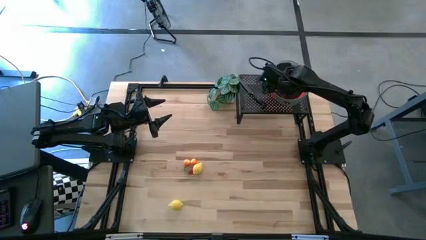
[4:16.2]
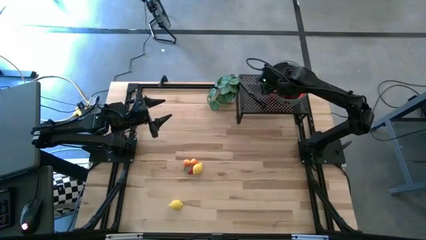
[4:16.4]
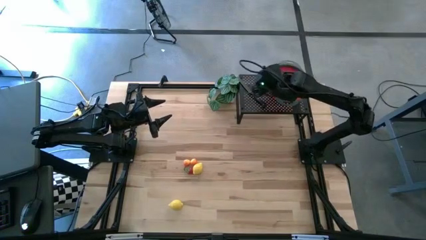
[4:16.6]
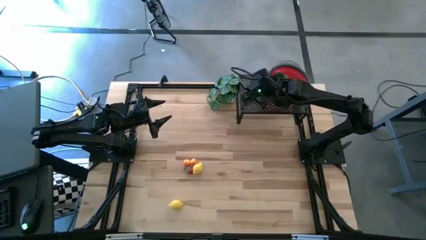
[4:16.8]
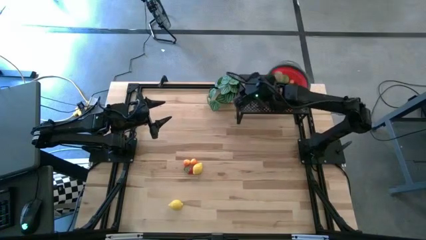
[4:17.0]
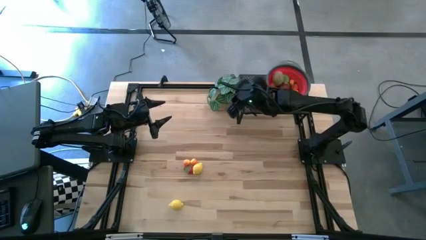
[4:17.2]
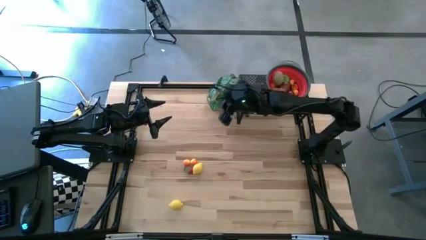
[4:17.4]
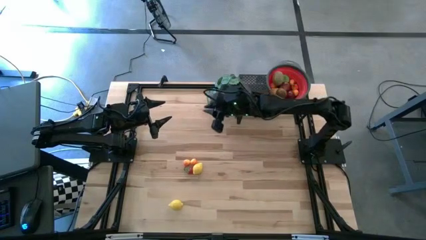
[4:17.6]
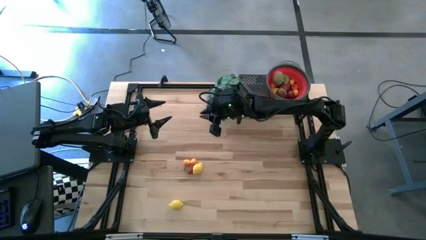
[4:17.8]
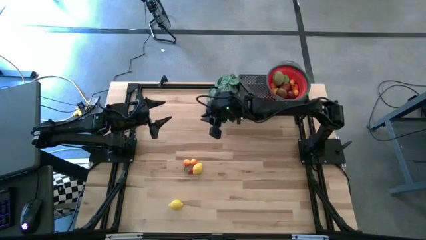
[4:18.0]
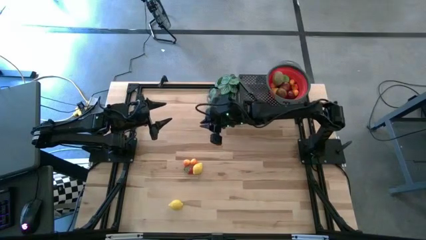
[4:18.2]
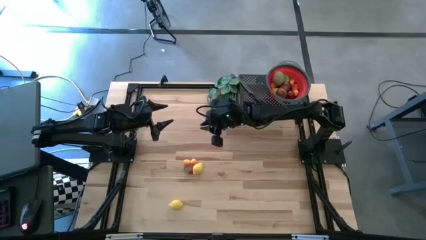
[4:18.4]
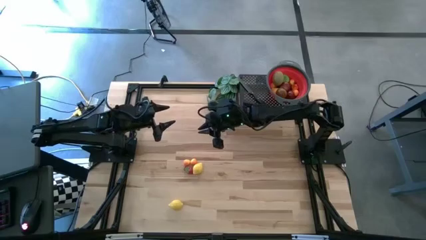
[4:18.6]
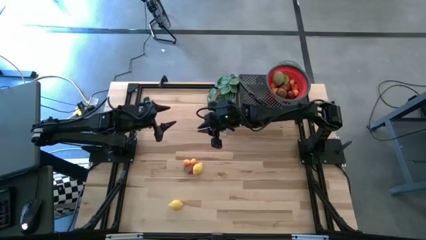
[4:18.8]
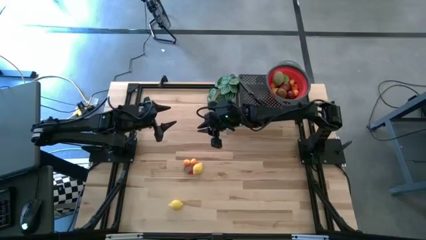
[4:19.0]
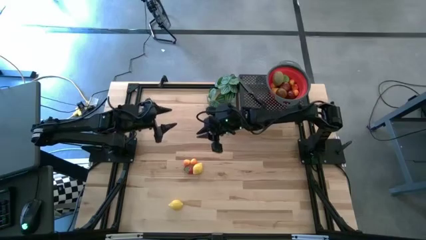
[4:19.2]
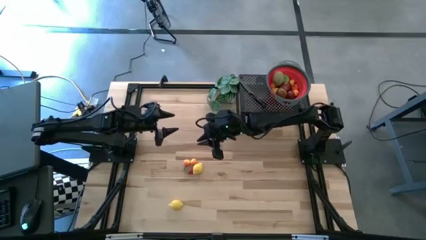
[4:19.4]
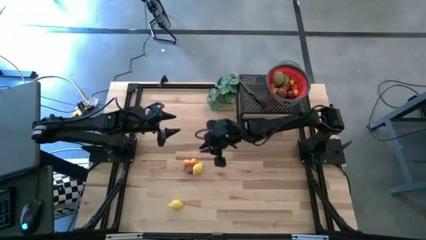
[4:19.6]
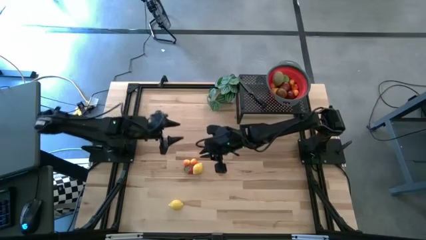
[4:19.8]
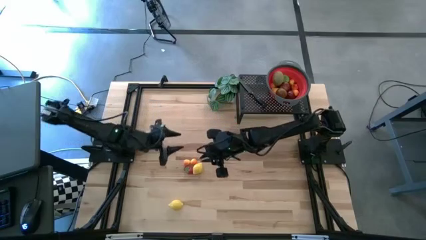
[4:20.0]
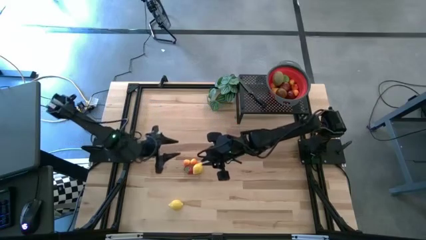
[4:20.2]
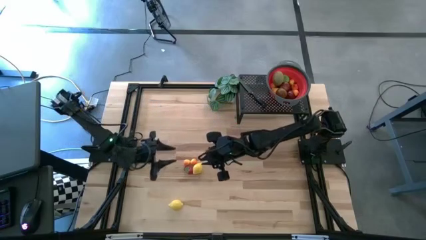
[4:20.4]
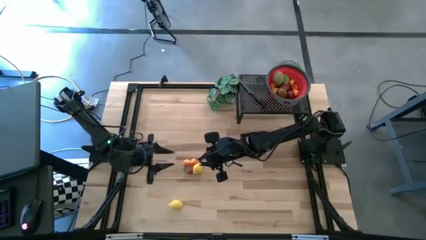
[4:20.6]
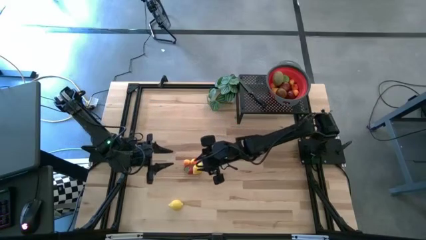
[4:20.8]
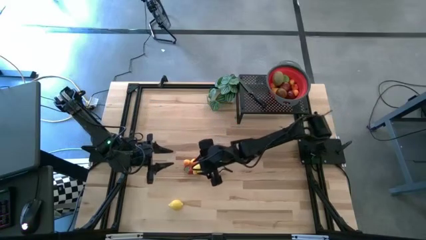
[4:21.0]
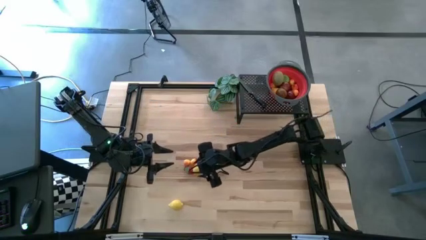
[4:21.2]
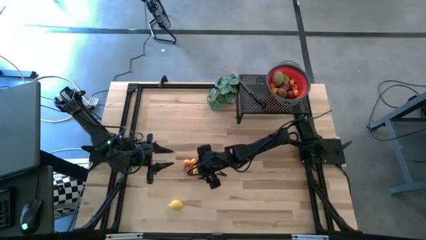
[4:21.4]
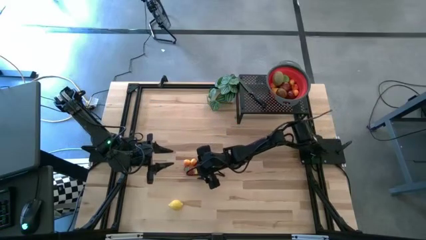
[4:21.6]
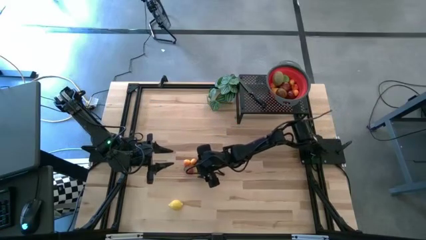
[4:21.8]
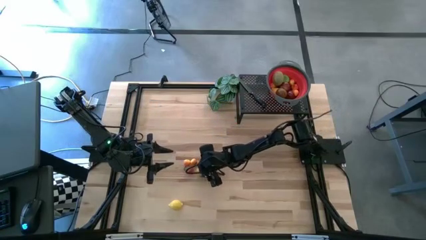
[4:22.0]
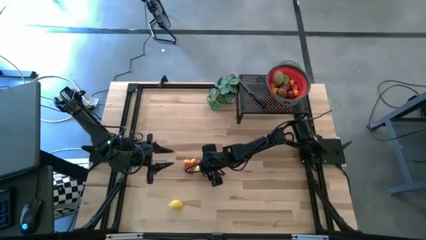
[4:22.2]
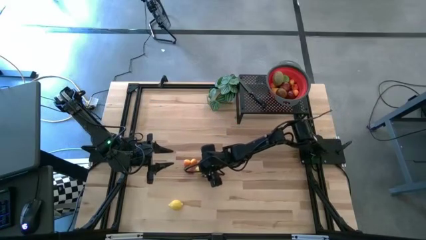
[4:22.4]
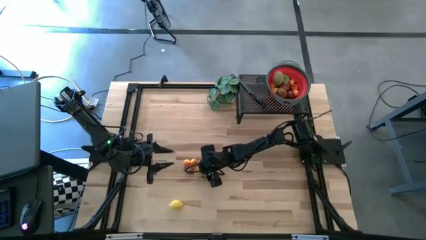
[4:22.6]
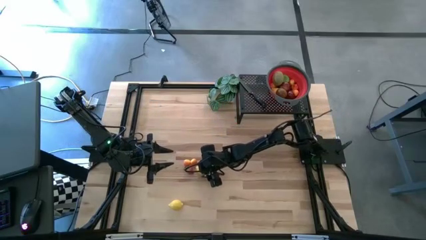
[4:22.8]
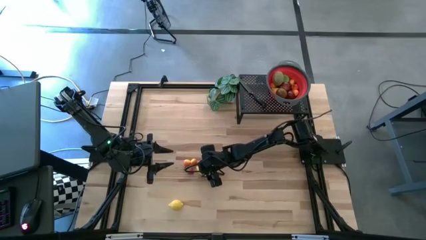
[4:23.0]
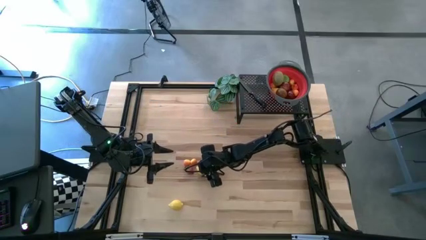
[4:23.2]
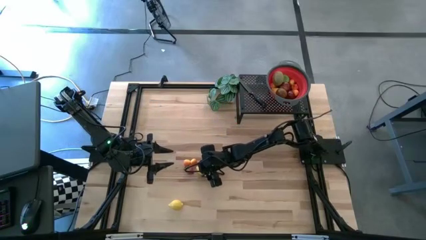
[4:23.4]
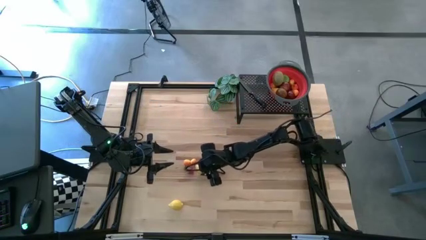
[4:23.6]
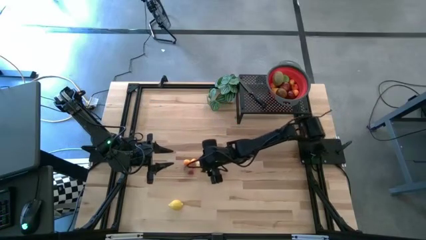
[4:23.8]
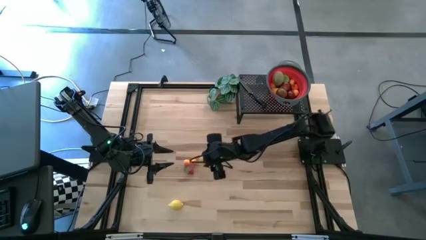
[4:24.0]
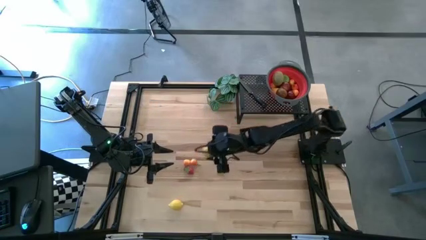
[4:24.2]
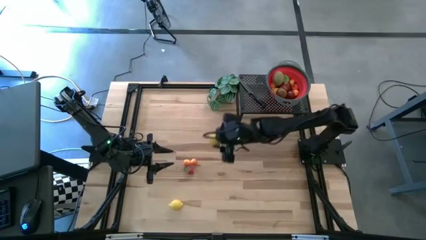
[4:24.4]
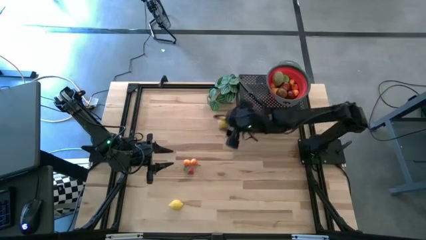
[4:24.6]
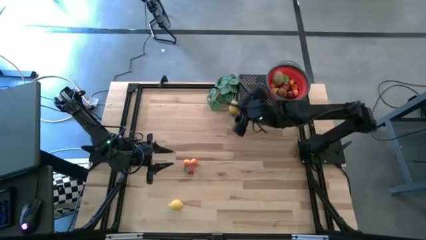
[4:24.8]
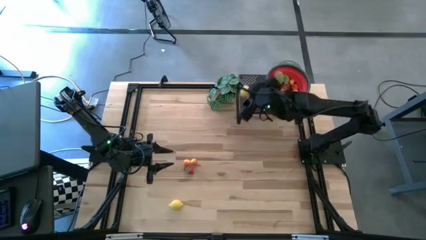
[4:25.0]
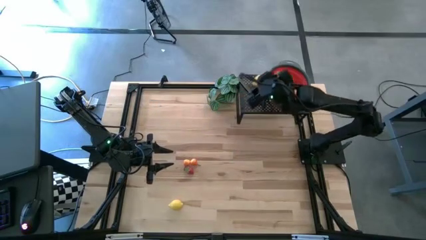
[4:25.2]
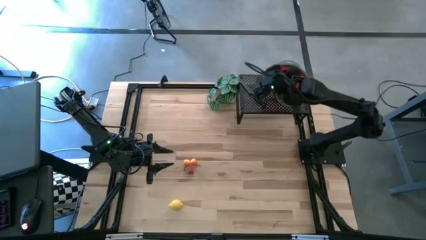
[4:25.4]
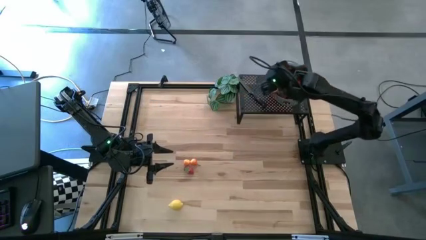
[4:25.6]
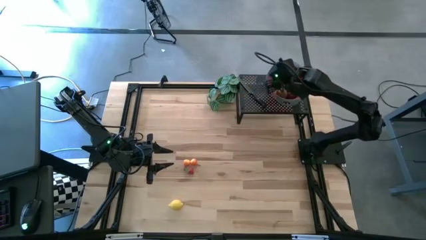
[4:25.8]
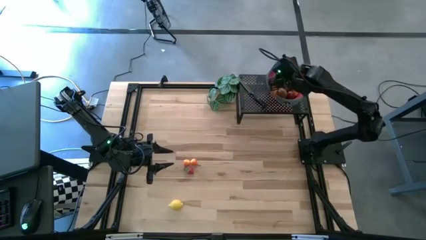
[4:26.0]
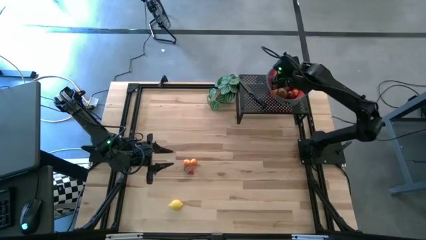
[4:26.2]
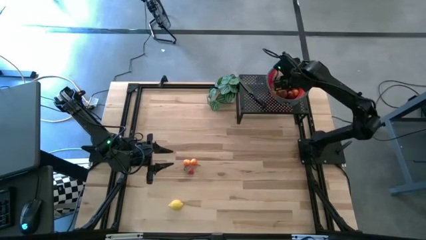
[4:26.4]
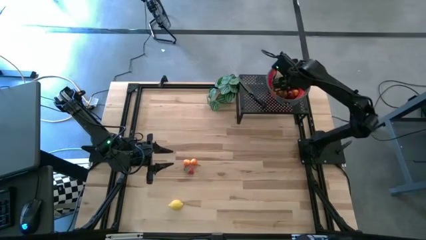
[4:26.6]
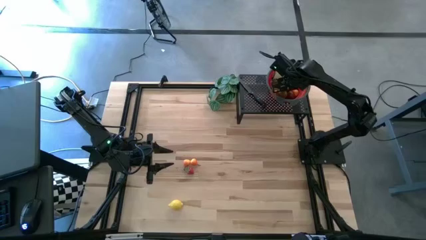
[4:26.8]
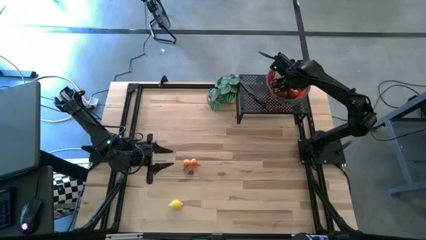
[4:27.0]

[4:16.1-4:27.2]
Task: Pick & Place Fruit
Put the yellow lemon into the red strainer bowl

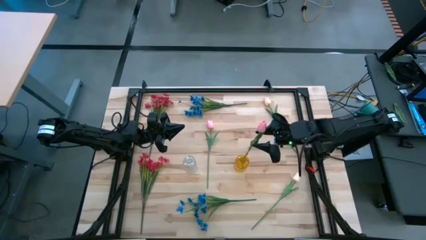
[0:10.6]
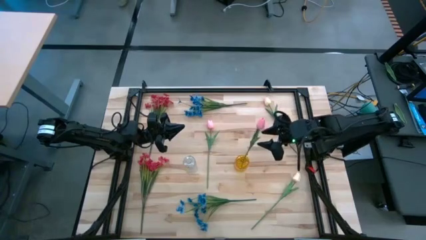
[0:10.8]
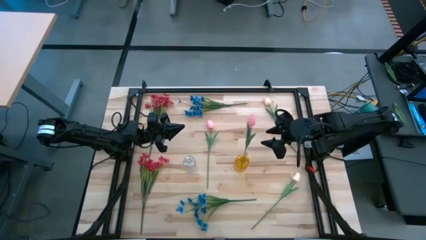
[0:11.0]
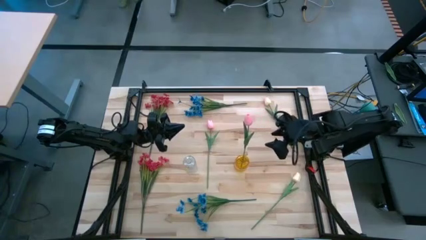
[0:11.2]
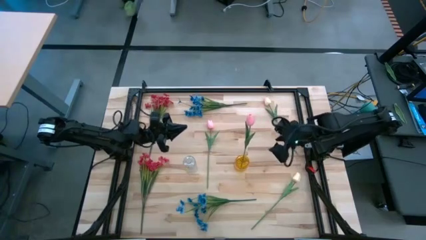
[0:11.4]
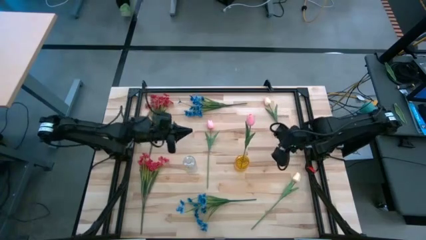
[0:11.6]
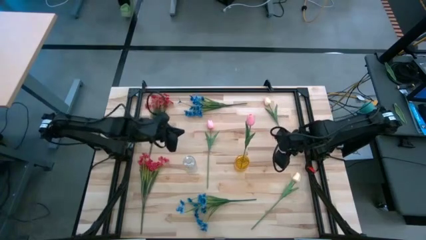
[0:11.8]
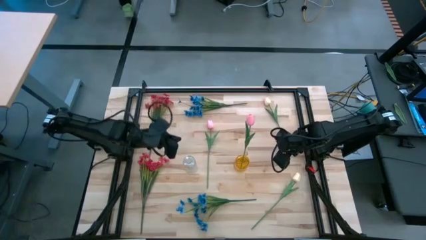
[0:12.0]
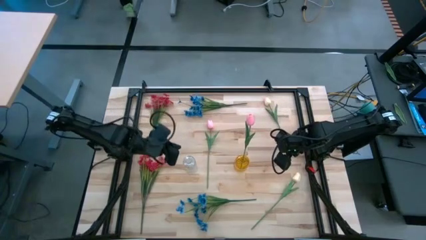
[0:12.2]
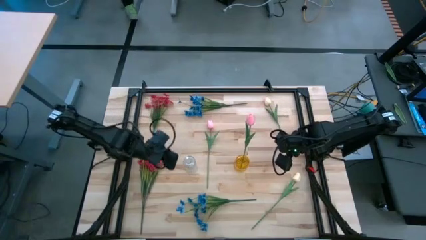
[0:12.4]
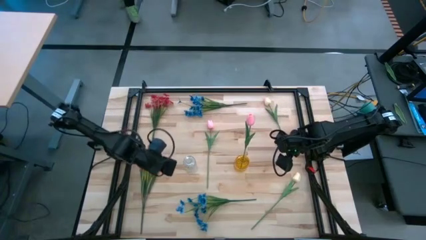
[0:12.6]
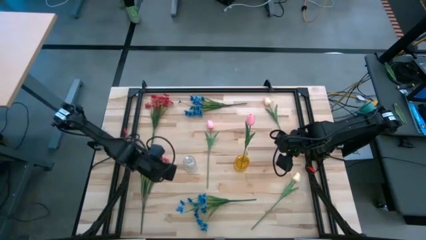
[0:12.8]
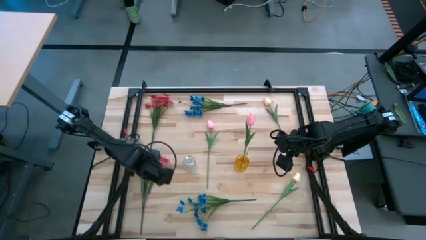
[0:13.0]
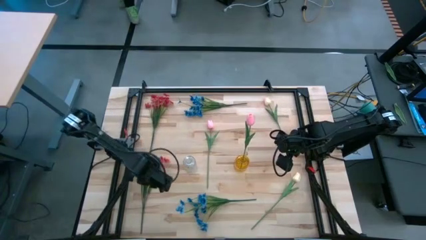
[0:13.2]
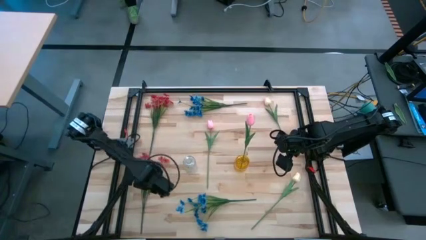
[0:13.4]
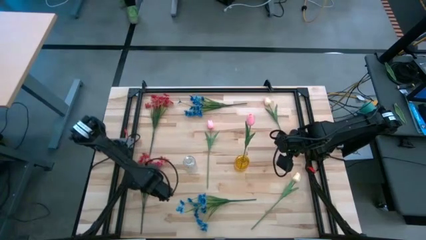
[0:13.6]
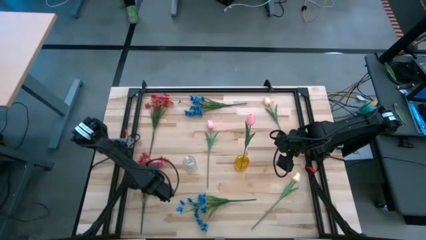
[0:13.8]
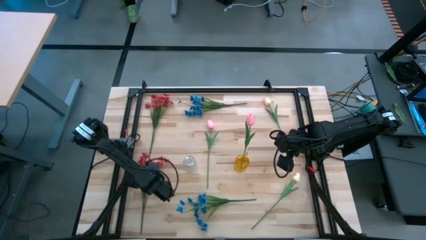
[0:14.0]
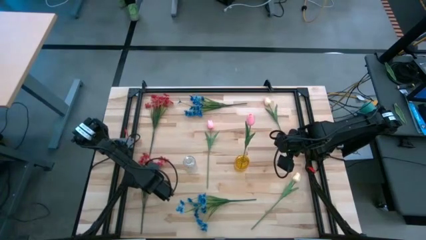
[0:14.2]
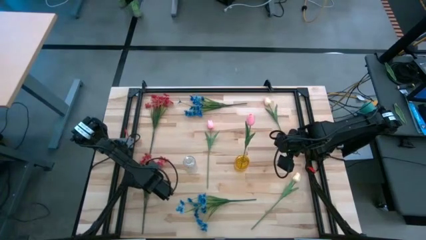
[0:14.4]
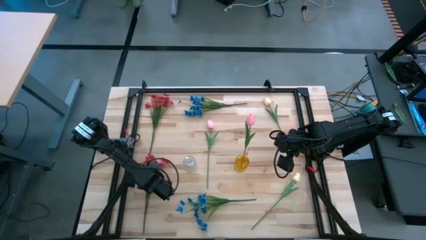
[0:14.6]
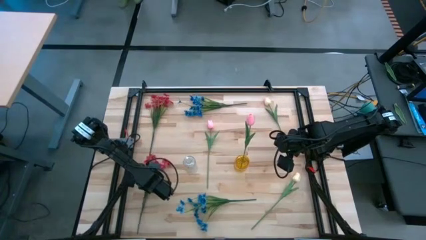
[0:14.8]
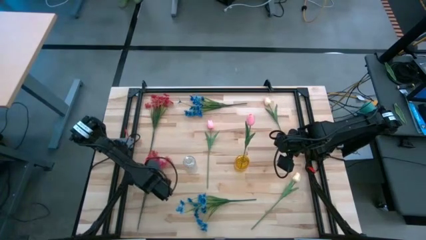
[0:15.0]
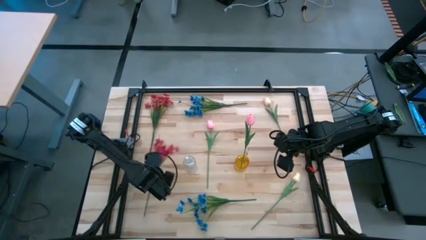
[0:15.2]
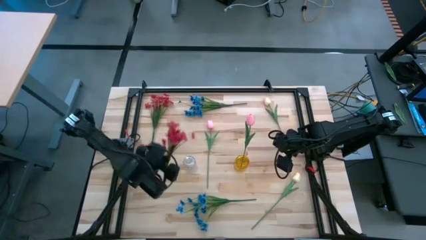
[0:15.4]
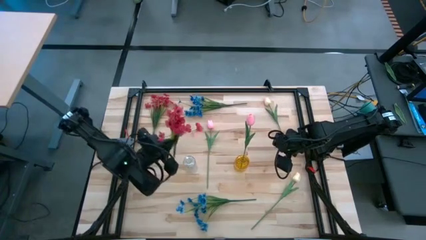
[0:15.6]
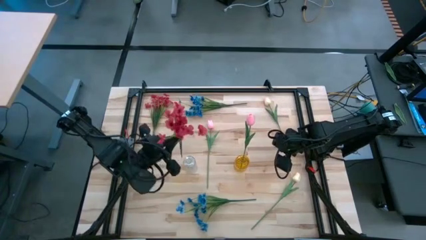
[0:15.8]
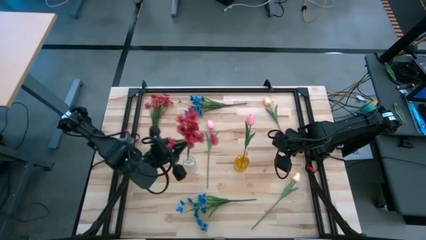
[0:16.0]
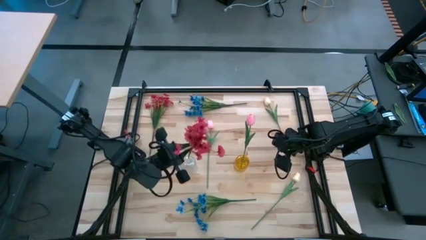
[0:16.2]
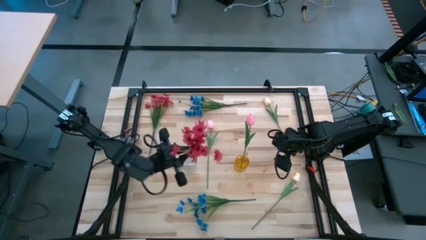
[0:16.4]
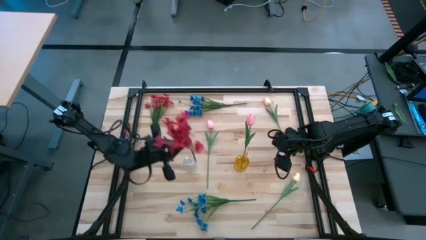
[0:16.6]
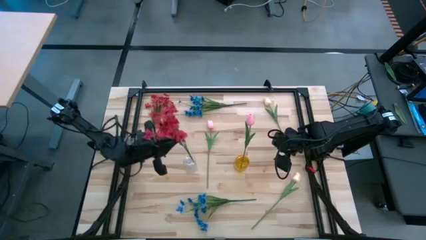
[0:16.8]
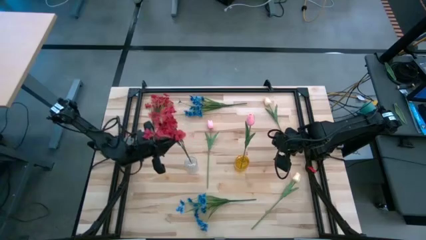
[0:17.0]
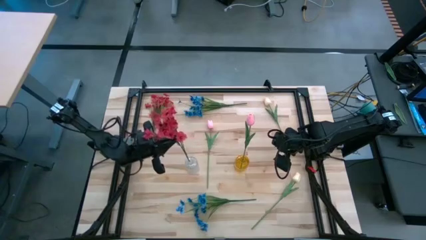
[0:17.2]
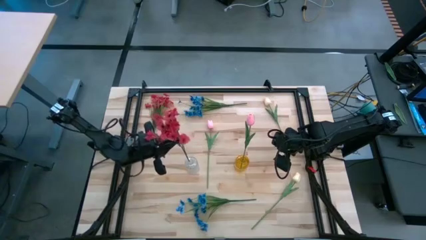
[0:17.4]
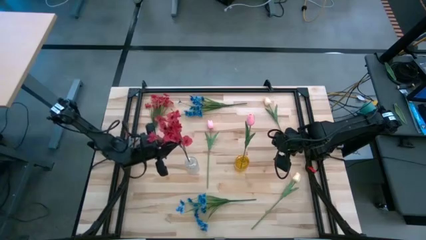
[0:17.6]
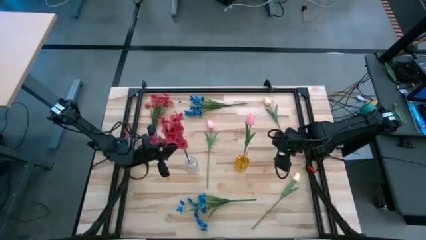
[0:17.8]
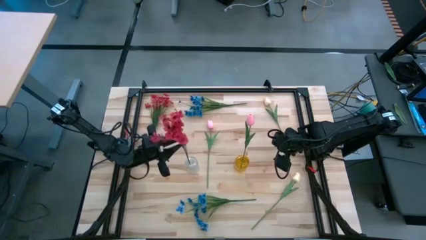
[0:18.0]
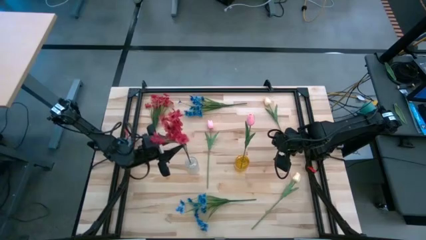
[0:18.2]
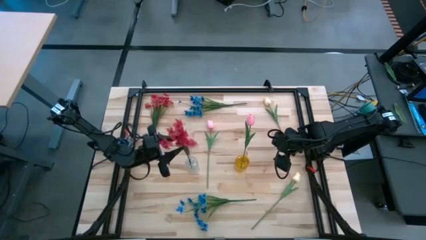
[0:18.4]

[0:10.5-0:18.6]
Task: Sort flowers into vase by color
Put the bottom red flower into the transparent vase
